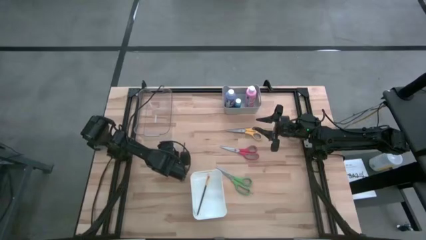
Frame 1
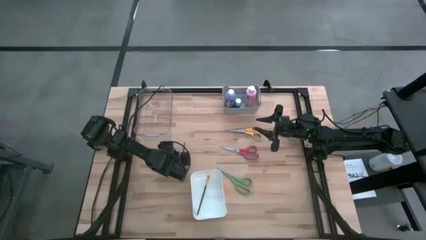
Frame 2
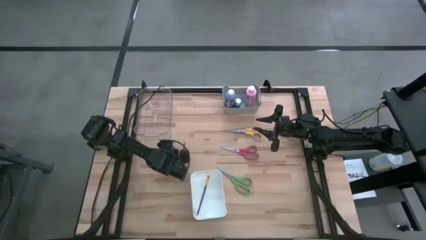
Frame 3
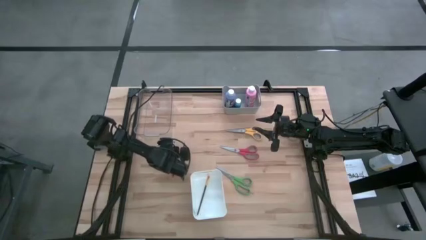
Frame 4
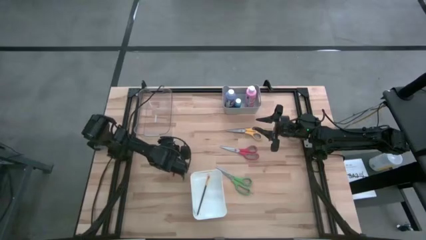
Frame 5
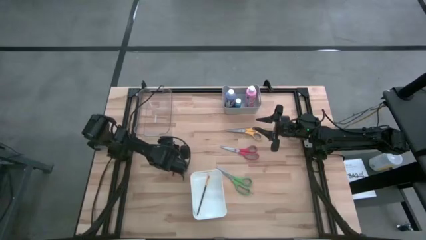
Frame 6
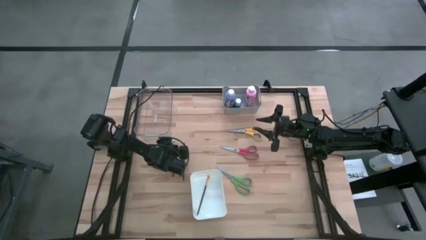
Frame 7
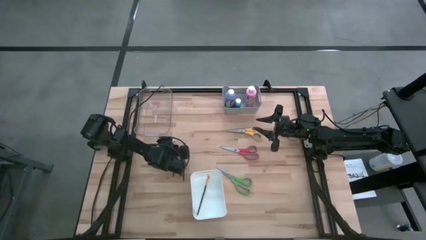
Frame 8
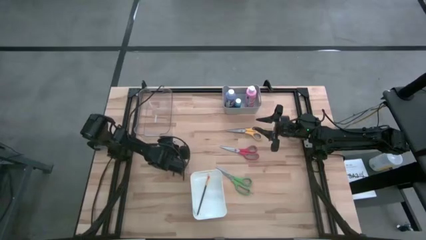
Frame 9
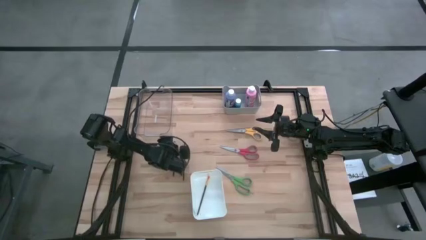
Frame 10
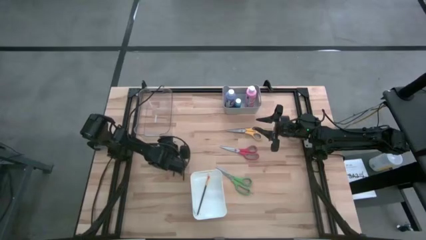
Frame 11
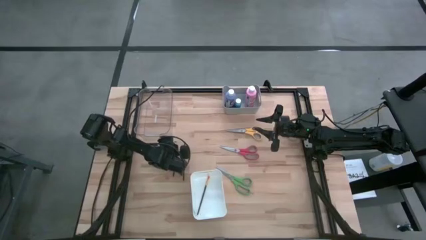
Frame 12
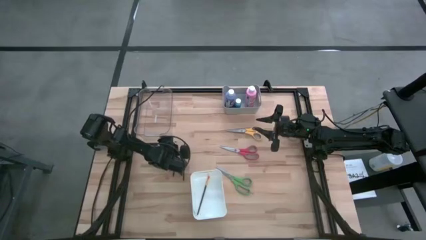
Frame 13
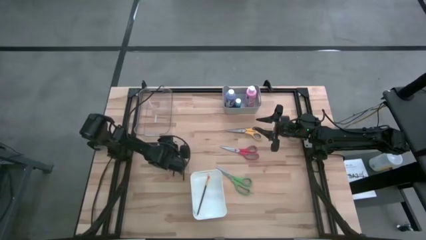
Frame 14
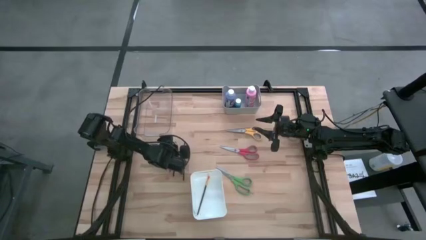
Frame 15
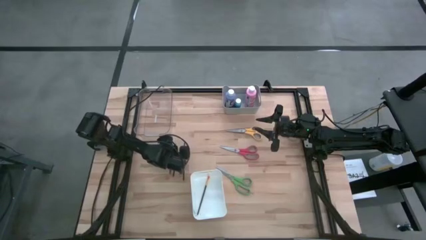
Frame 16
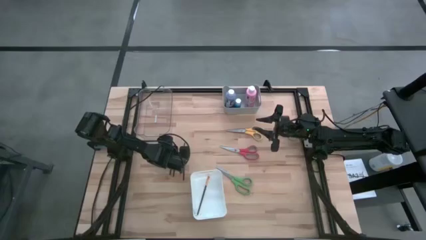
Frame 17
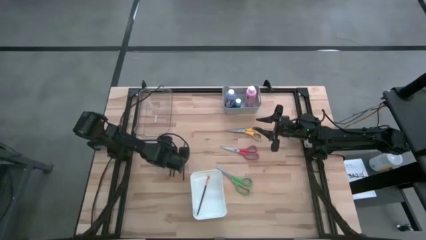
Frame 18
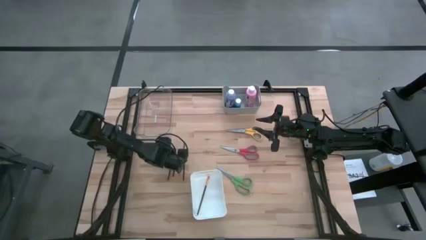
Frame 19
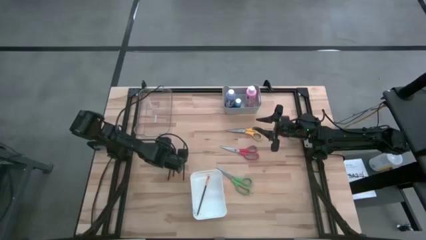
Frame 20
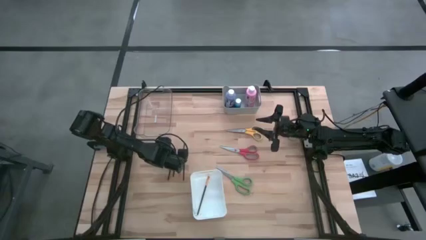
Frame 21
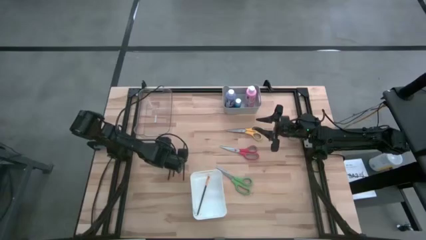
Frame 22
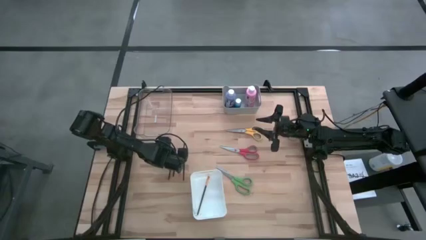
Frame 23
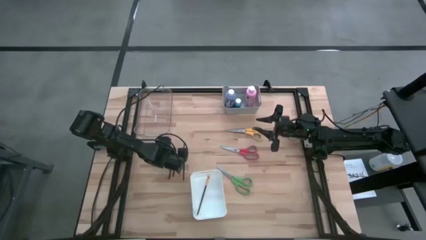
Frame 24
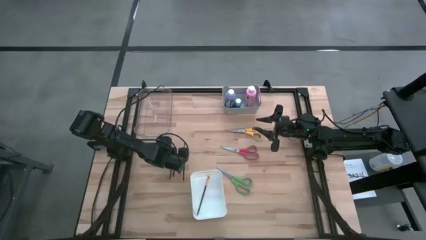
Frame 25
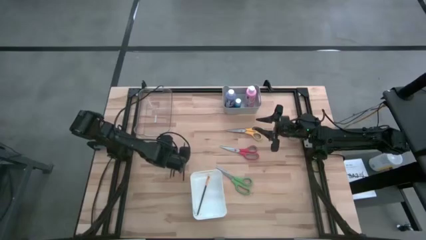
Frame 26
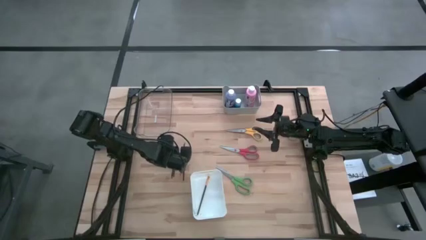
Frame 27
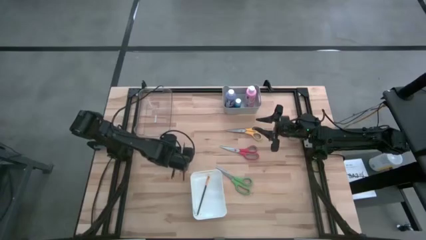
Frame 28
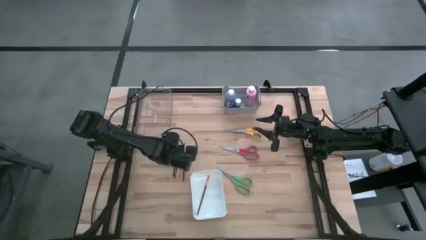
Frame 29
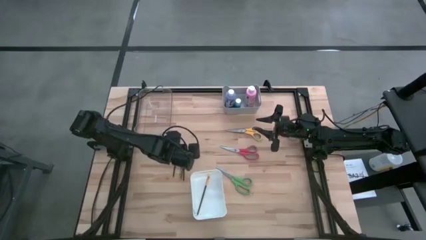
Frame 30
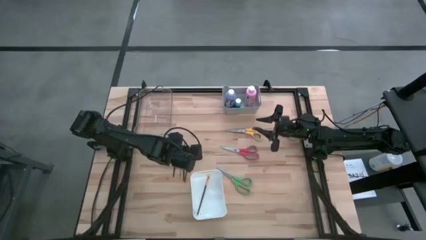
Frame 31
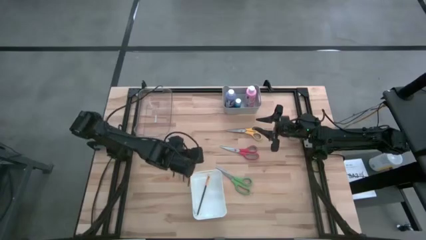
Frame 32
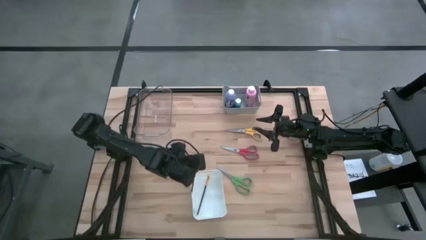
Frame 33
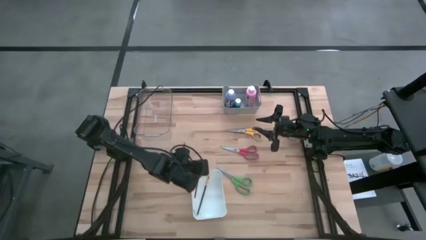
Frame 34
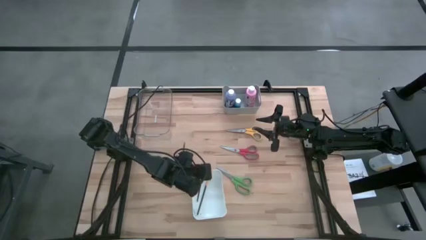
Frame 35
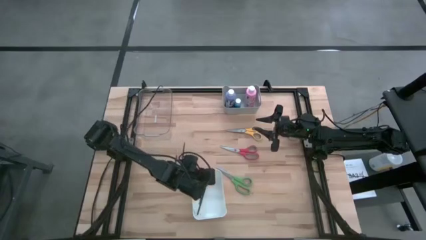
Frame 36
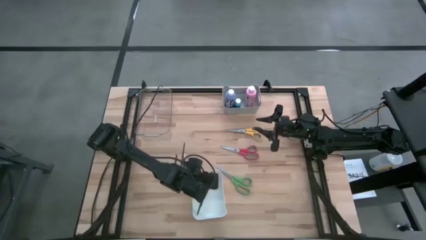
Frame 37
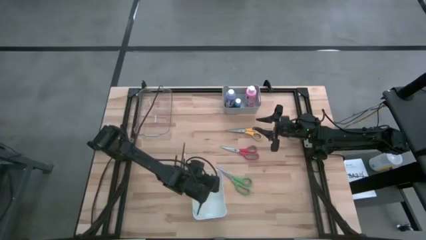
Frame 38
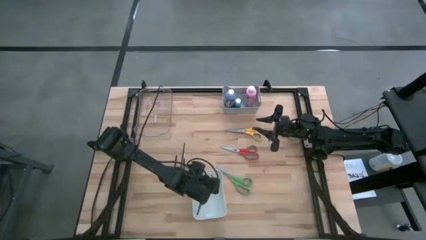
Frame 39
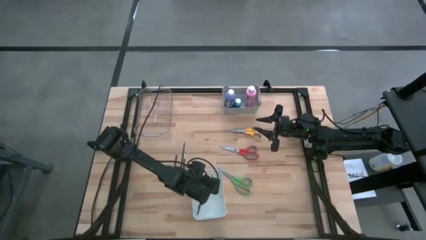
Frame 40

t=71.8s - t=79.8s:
Task: Pick & Place Paint Supplies
Put the left silver eyeshadow brush into the gray bin

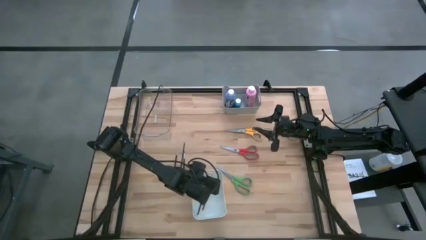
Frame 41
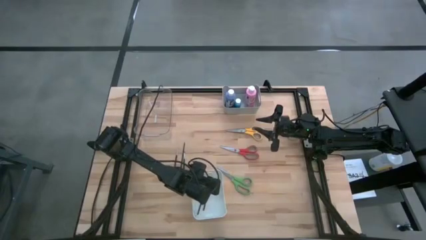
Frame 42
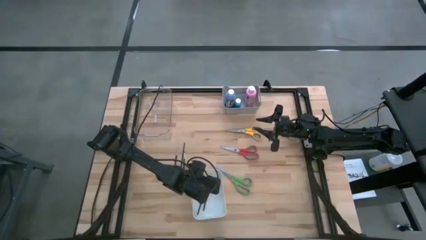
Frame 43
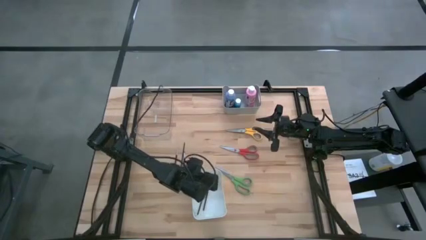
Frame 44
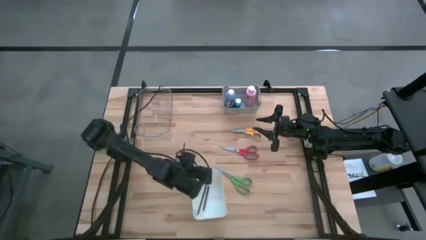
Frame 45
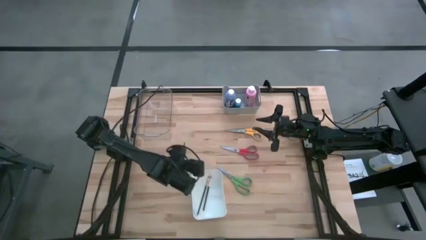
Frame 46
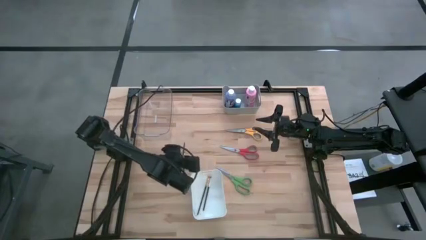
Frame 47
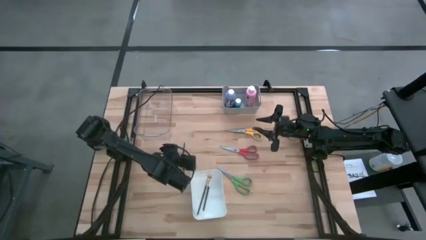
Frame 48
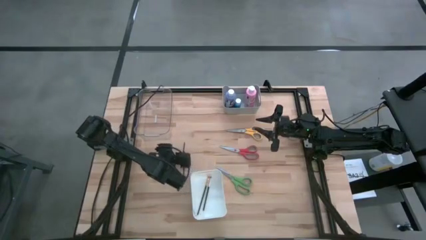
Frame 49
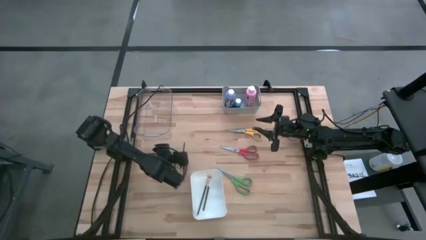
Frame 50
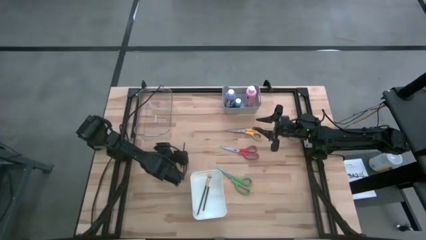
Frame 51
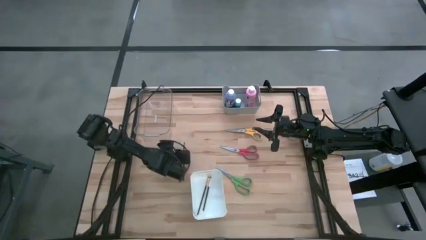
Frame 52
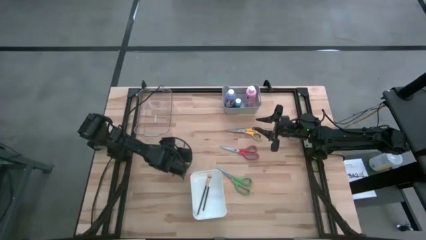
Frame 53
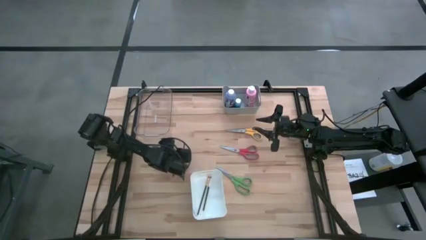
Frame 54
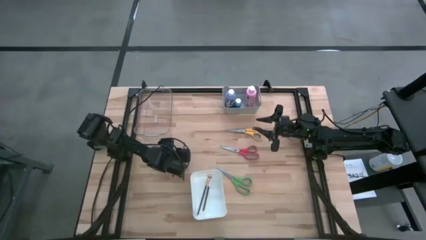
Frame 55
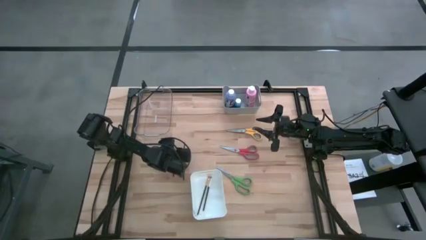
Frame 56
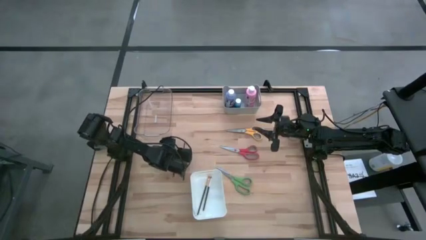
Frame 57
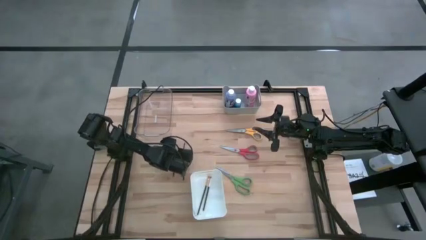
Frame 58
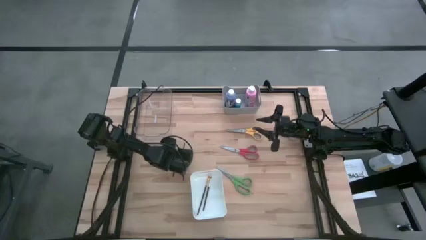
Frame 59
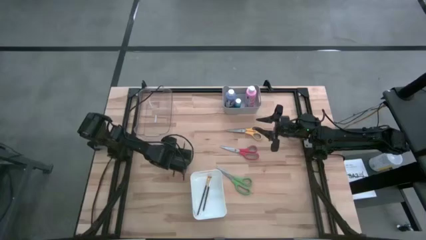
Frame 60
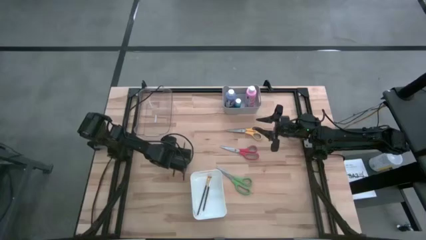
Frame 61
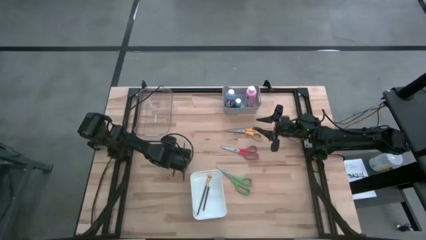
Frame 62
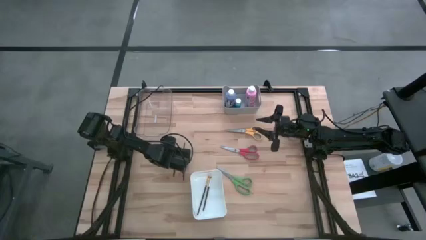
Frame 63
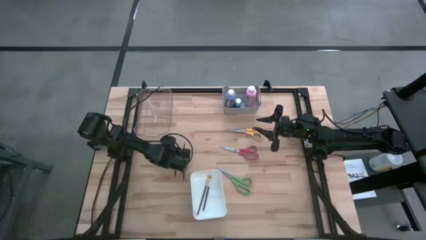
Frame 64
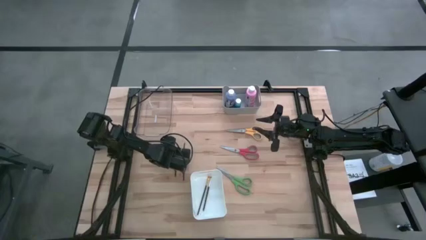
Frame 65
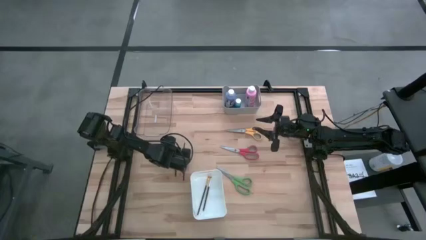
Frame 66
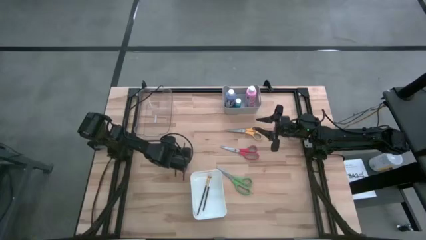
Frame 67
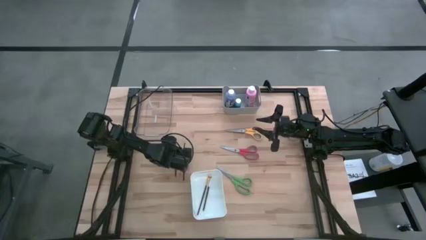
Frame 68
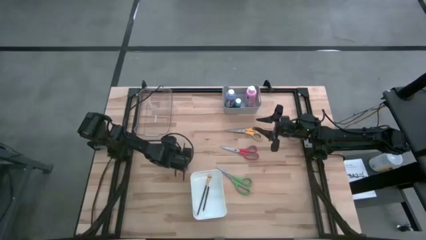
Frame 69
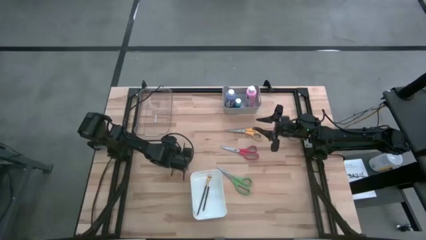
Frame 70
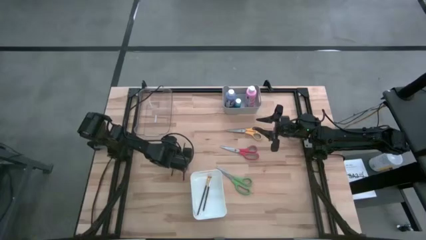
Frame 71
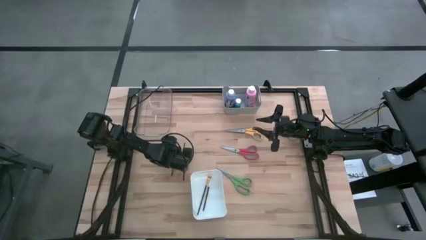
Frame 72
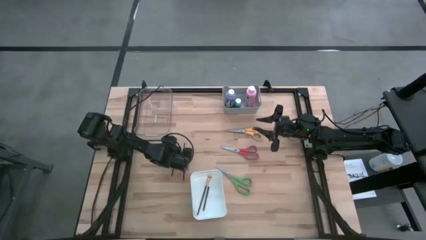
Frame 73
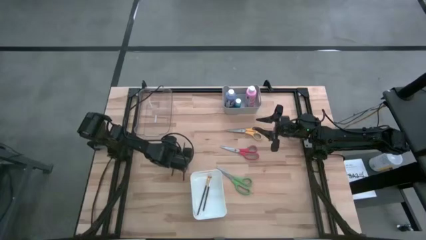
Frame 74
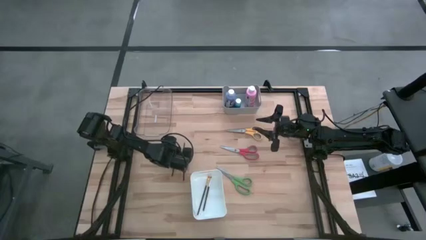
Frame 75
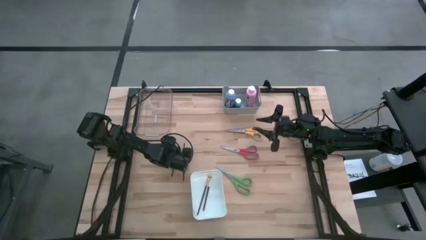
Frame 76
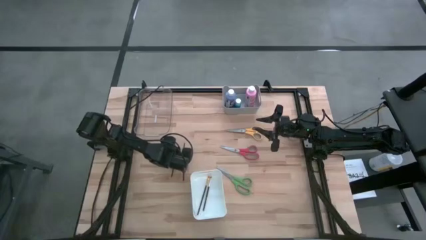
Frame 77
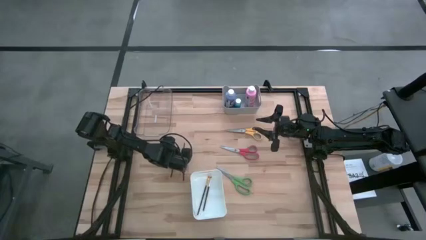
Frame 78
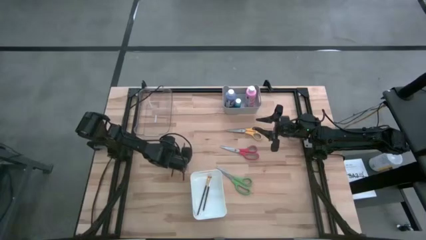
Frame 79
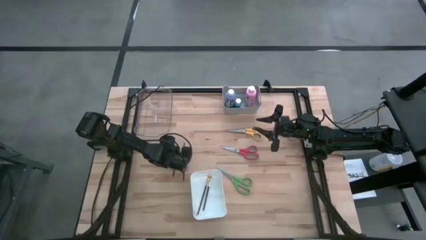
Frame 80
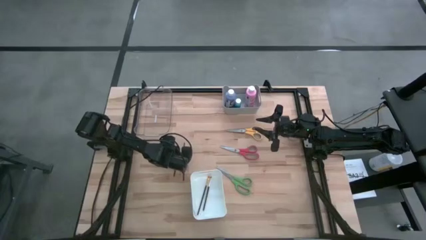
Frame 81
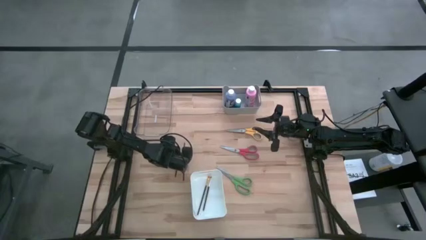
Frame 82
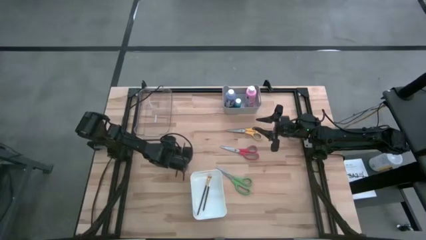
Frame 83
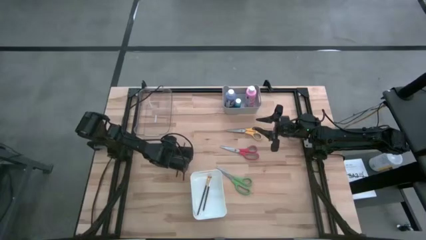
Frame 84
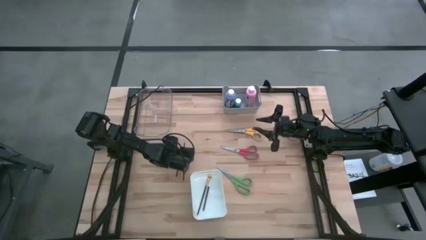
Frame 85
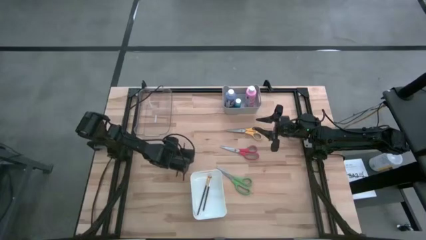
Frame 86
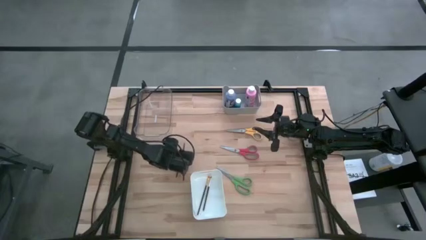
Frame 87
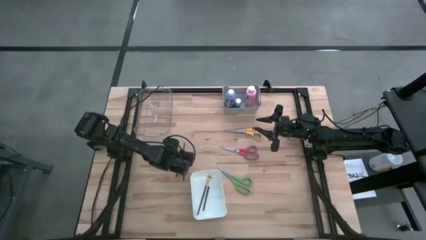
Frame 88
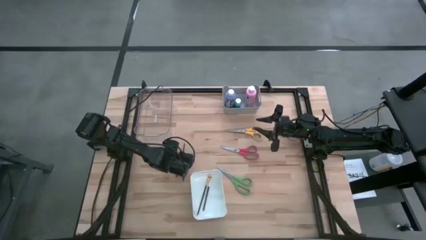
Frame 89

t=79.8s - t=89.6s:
Put the left silver liner brush into the gray bin
